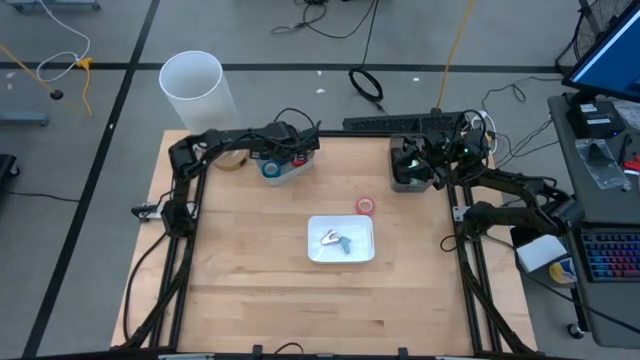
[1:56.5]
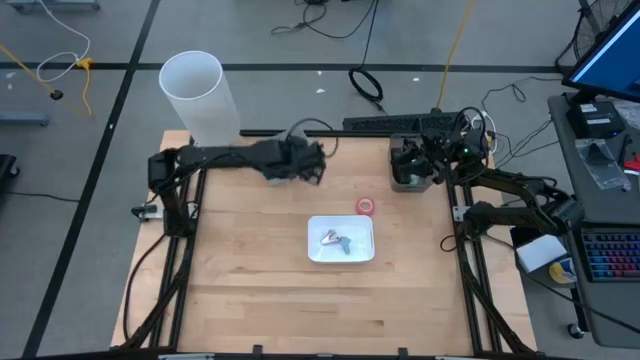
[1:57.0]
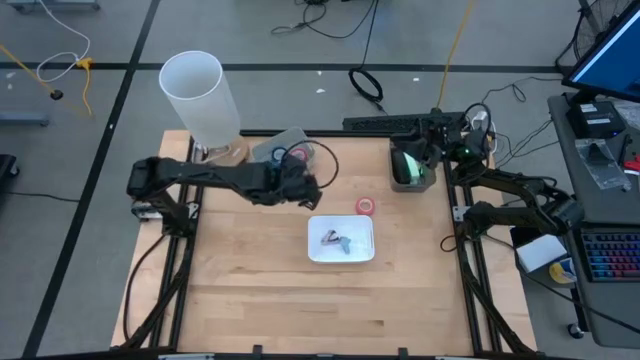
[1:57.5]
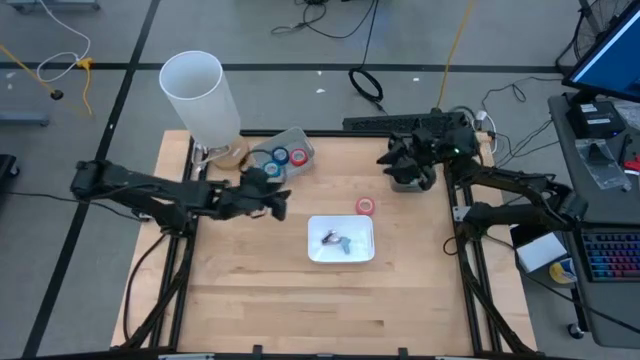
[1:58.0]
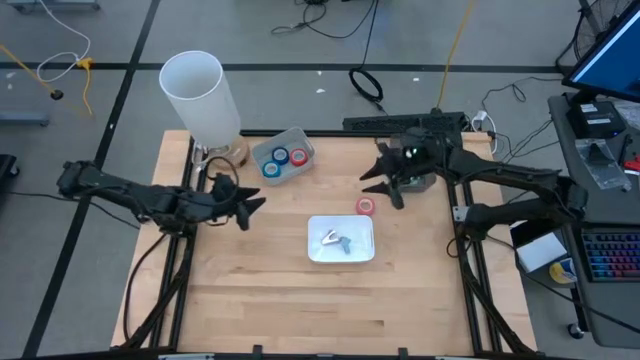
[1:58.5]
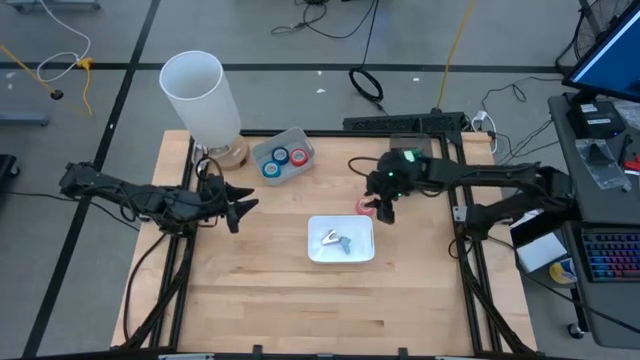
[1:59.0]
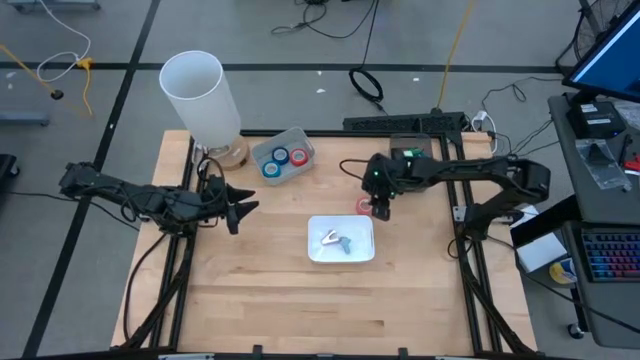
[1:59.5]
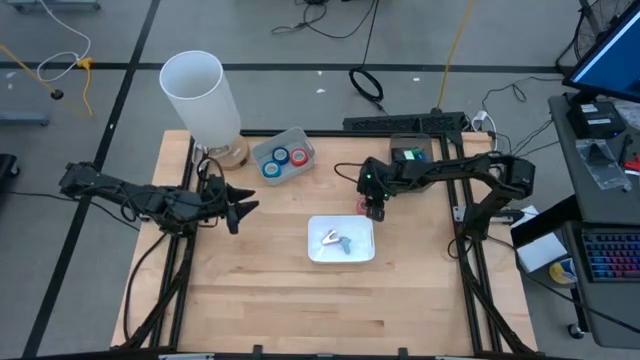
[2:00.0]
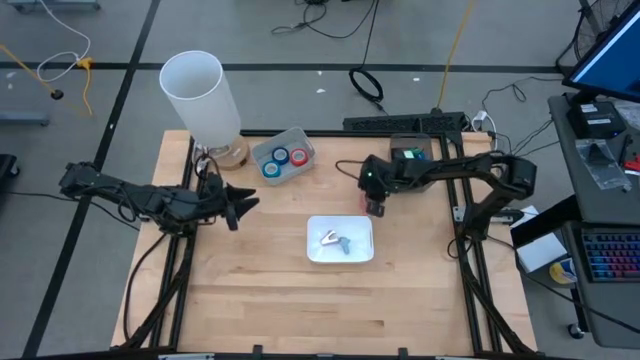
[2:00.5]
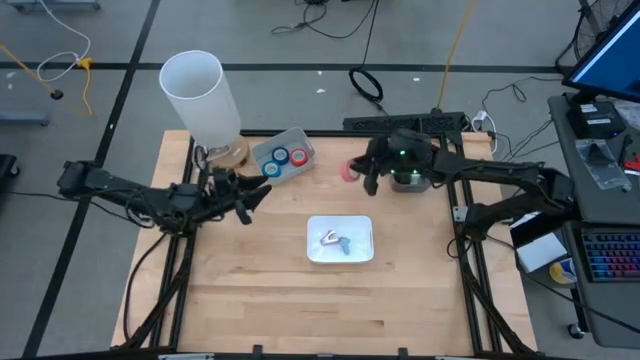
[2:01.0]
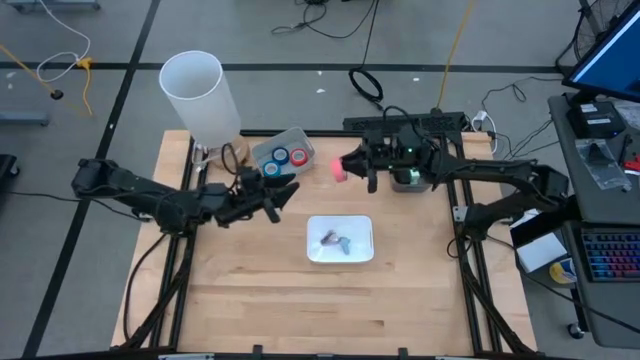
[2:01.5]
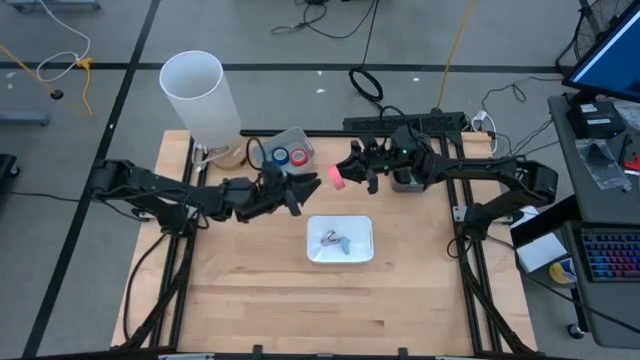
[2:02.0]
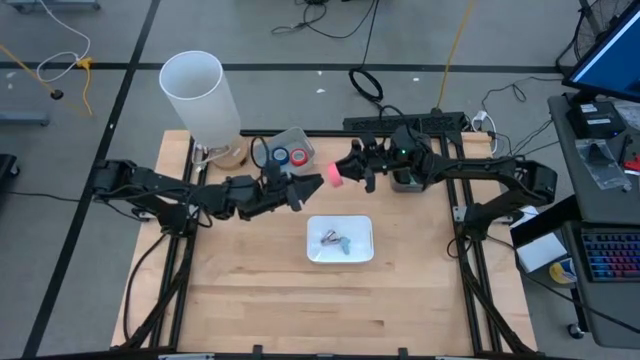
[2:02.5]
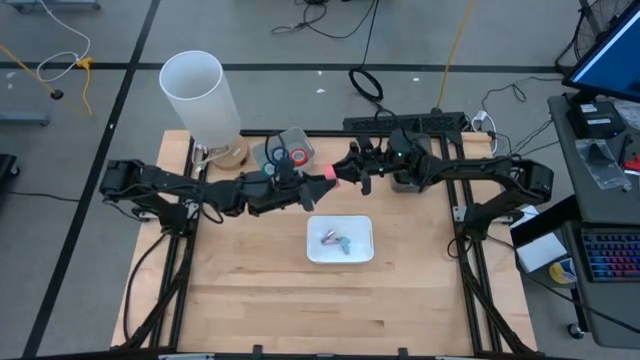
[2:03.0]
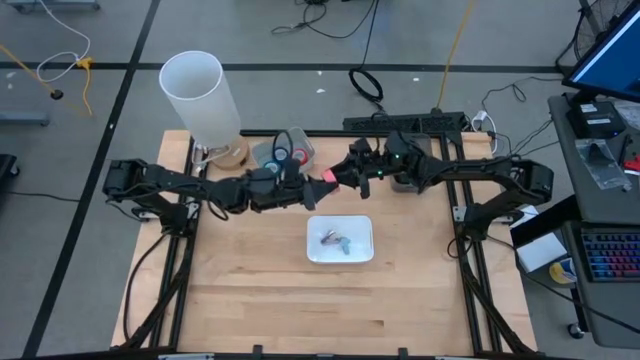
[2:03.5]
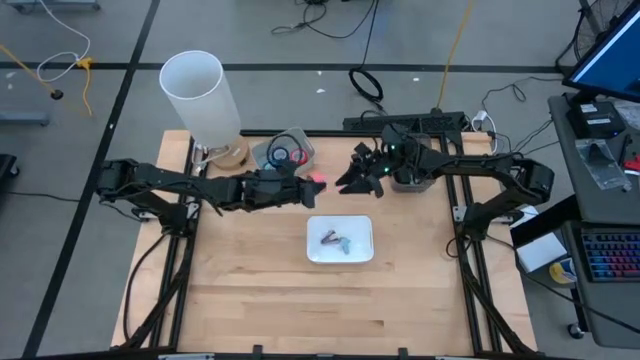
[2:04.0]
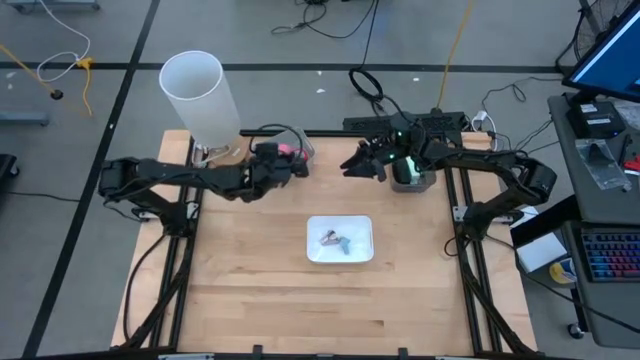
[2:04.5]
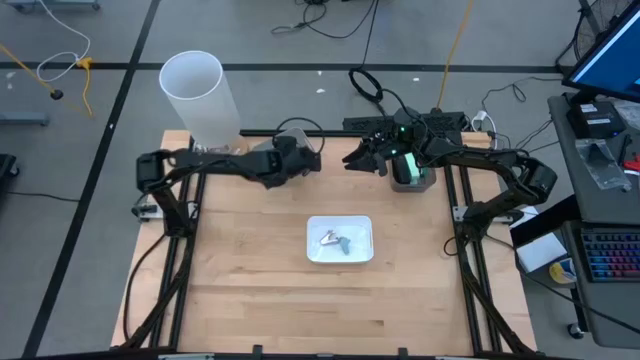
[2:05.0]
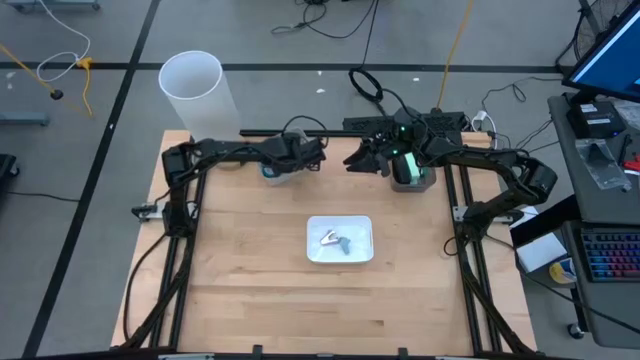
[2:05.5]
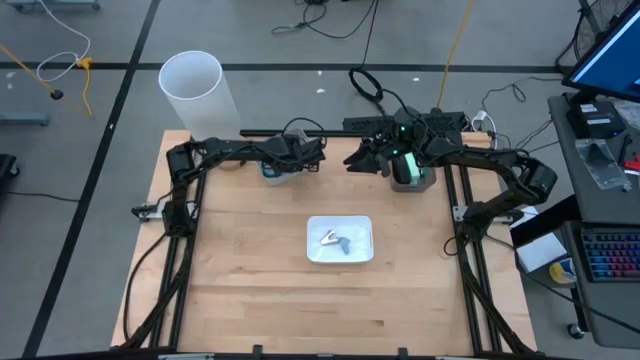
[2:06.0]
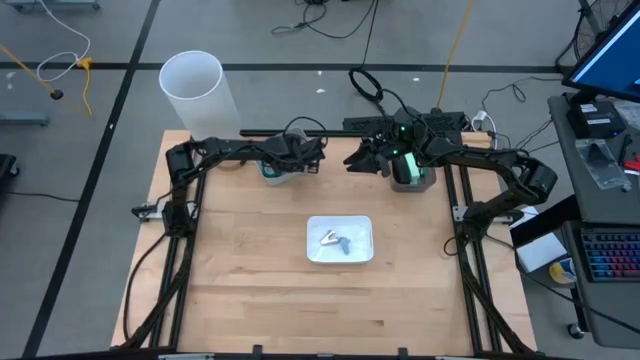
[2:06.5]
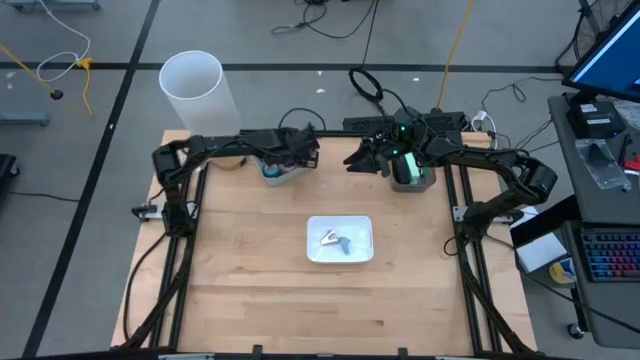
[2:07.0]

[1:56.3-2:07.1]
Task: Pick and place Stapler, Stapler remover, tape
Put the pink tape into the gray bin

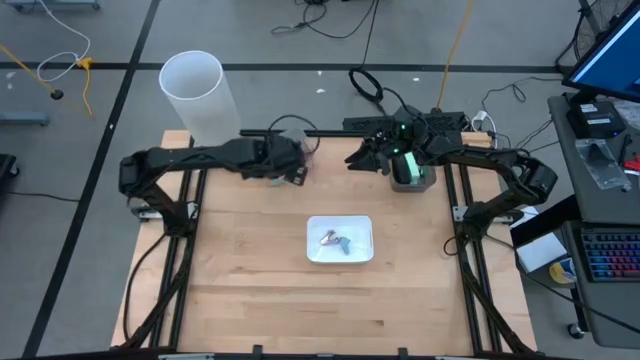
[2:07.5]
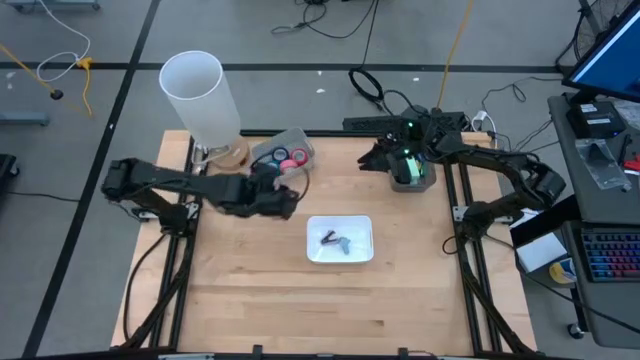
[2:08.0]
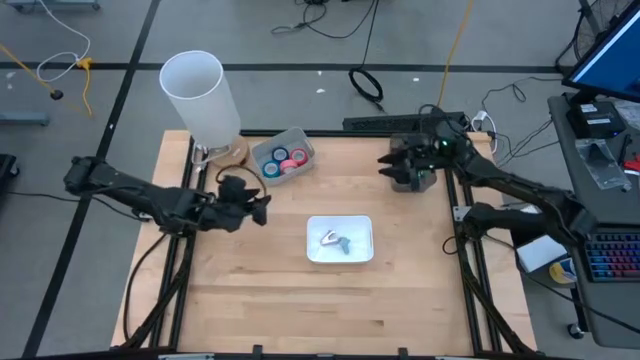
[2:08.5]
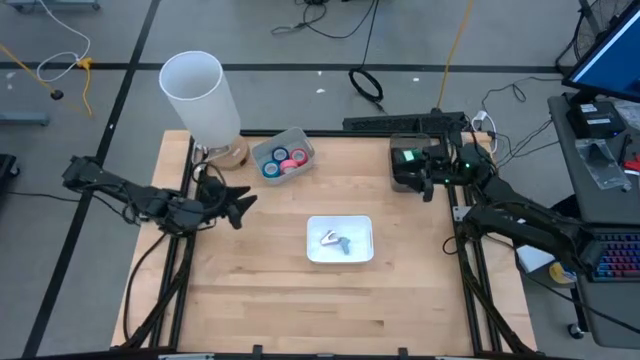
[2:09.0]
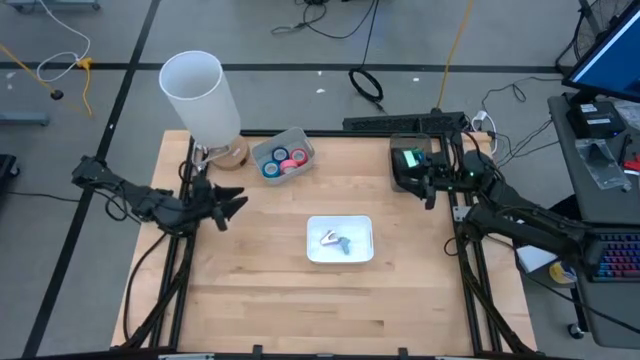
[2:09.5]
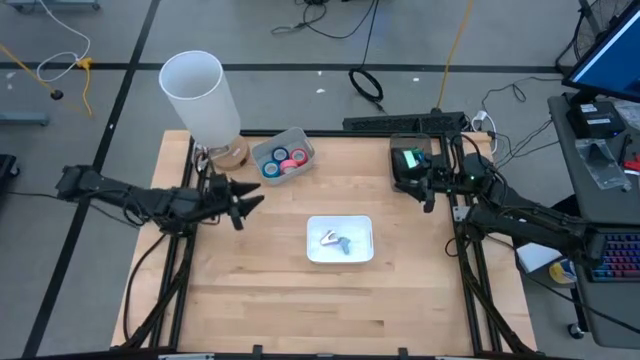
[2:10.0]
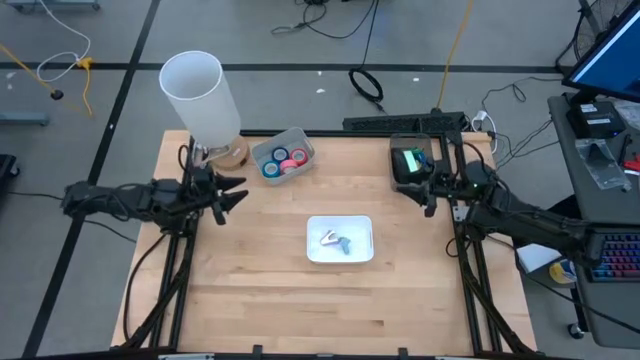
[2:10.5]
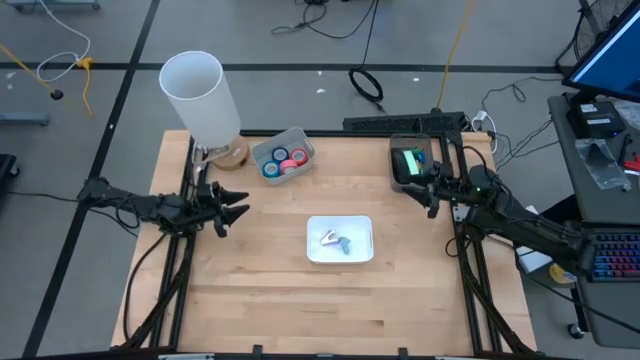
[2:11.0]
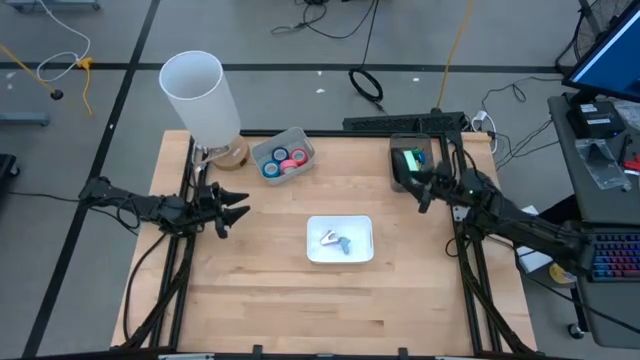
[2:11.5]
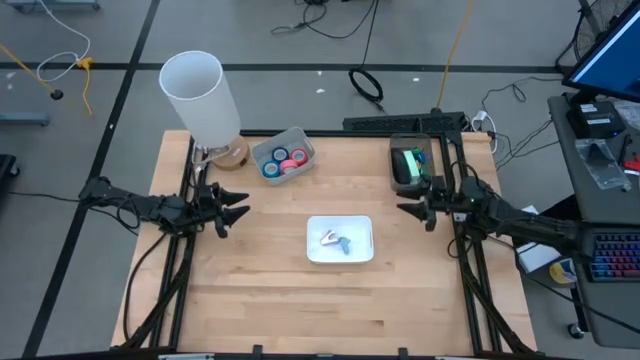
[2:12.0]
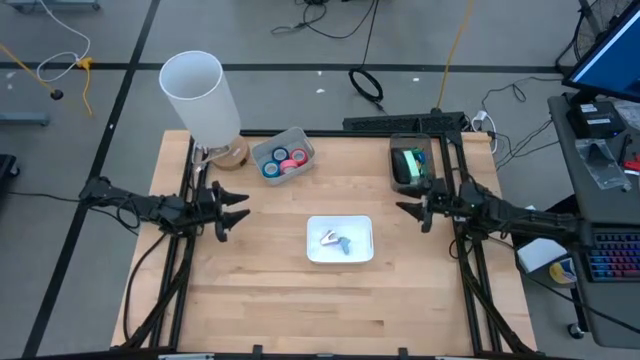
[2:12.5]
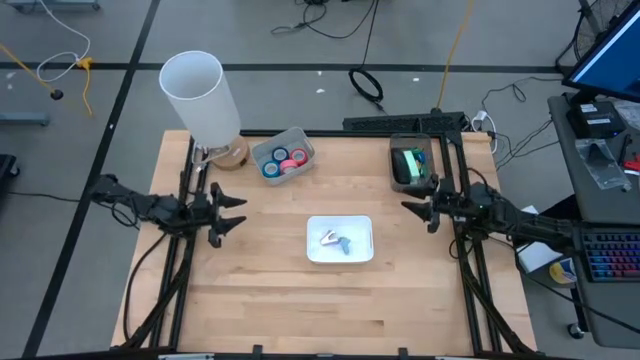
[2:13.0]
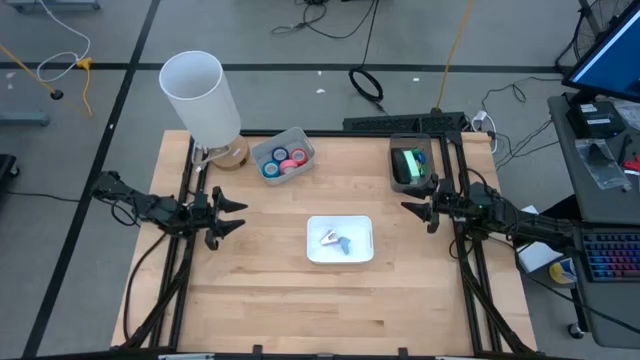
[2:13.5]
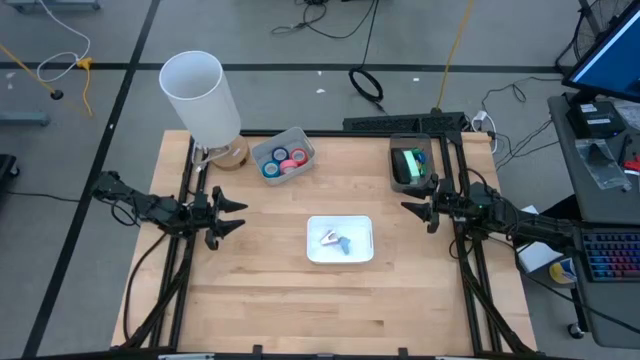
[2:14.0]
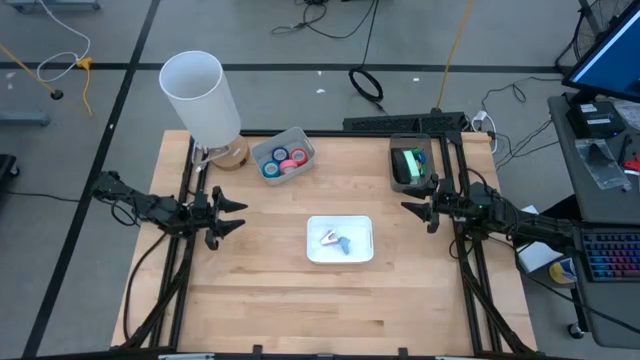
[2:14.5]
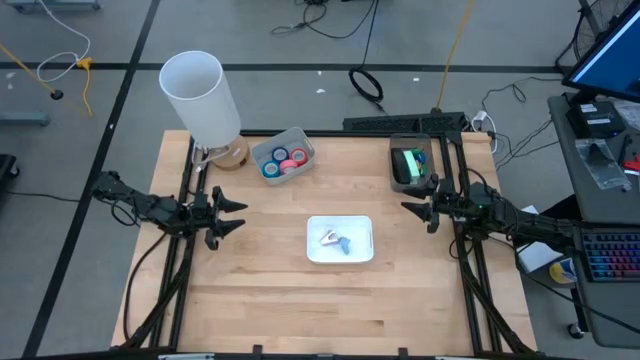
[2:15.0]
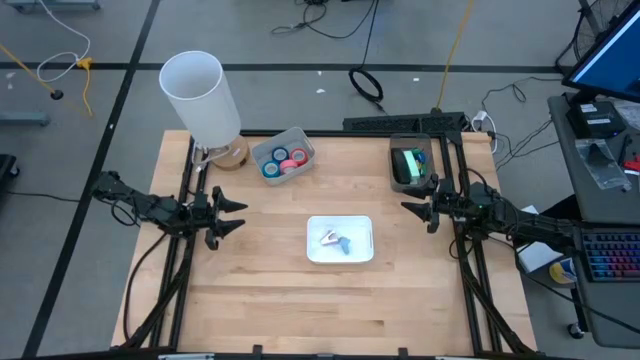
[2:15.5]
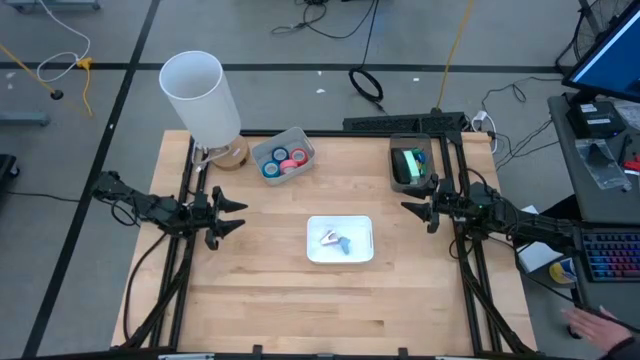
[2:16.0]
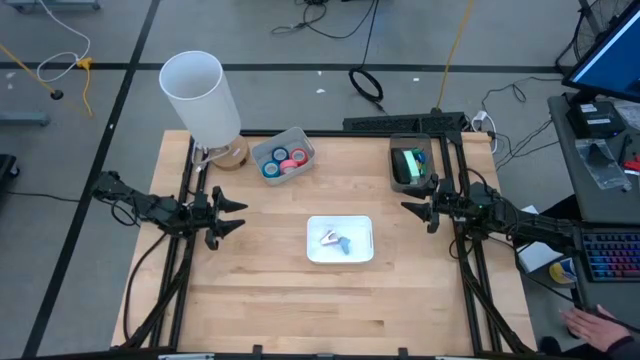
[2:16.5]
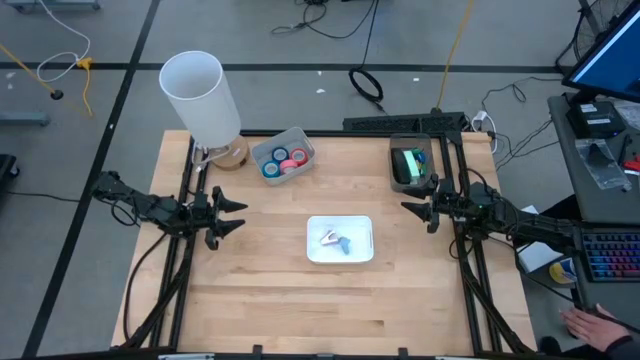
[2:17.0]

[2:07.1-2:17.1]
Return to Home Position

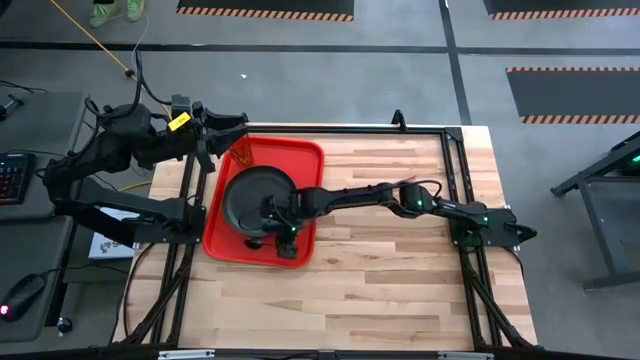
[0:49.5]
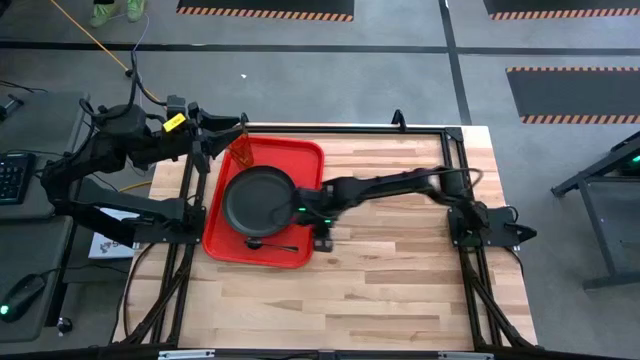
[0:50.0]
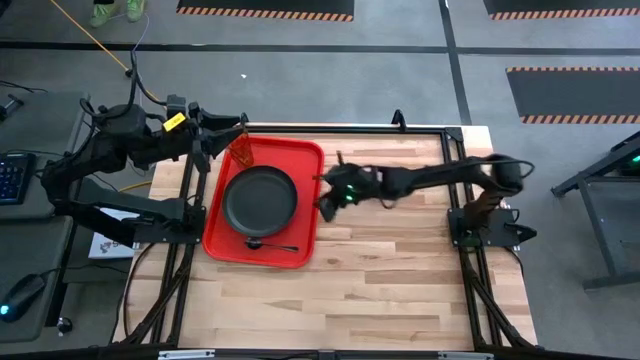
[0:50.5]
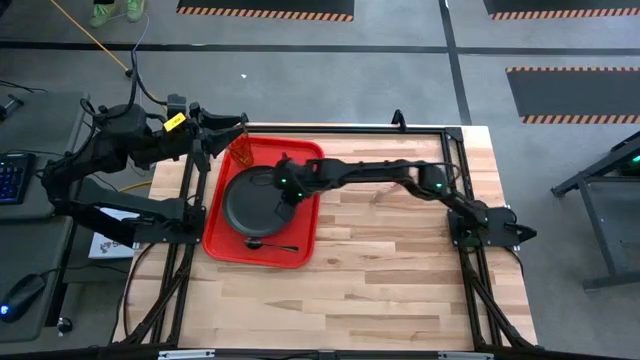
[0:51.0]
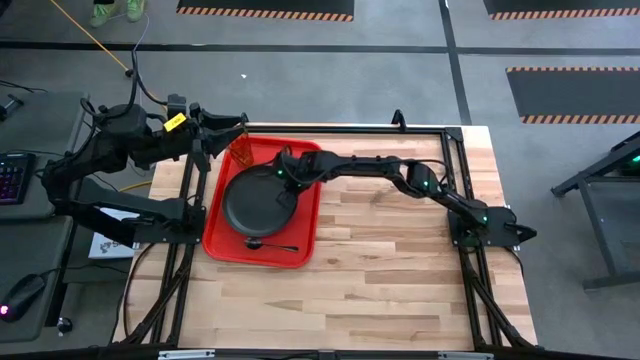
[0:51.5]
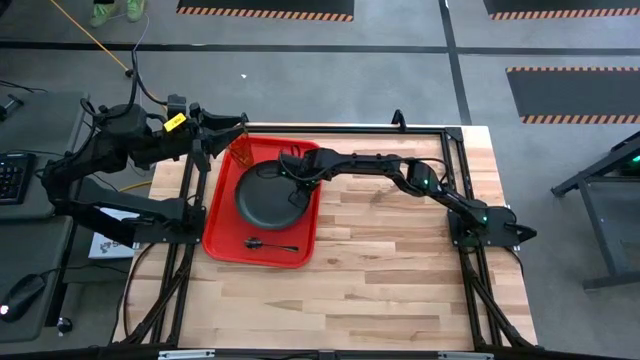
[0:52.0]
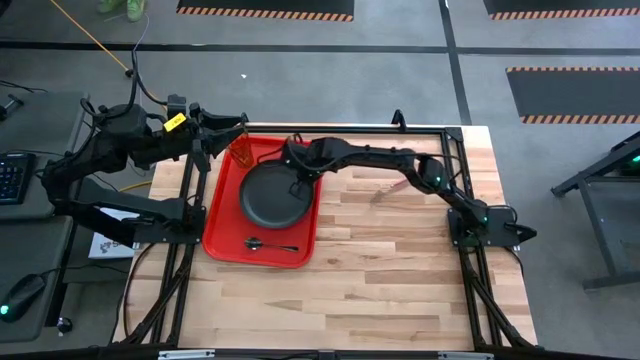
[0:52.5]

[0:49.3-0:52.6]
Task: Pick and place plate/cup/fork/spoon on tray
Adjust the black plate on the red tray
